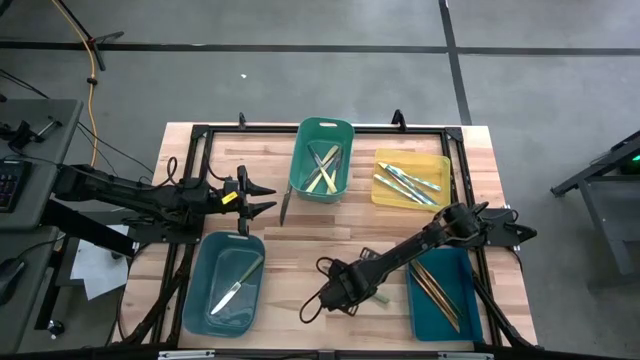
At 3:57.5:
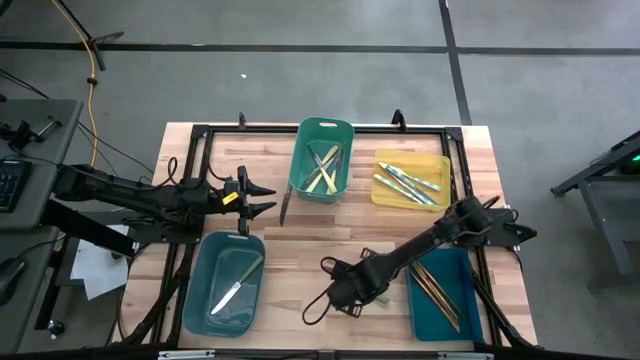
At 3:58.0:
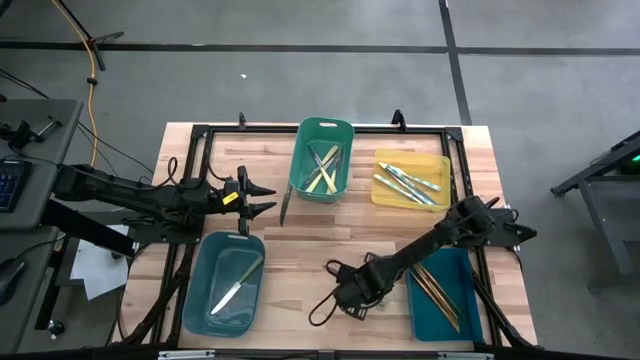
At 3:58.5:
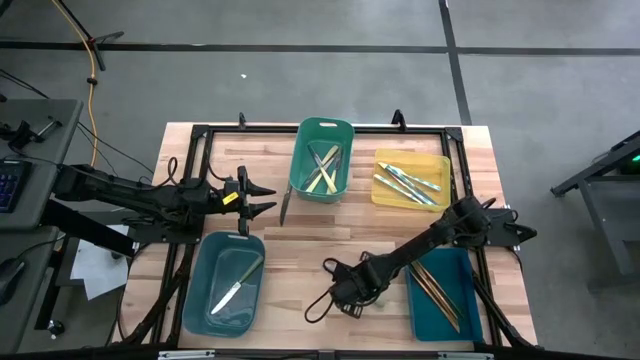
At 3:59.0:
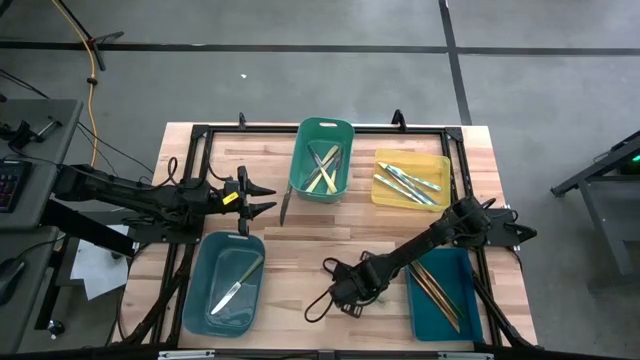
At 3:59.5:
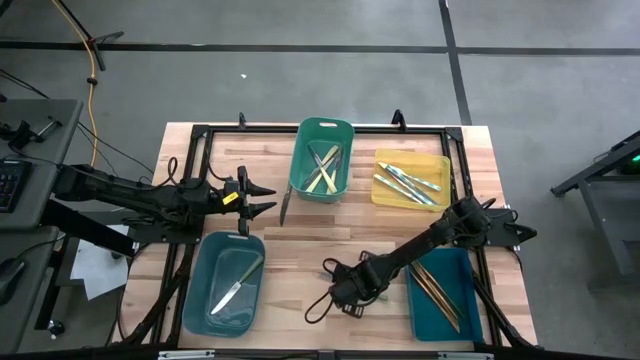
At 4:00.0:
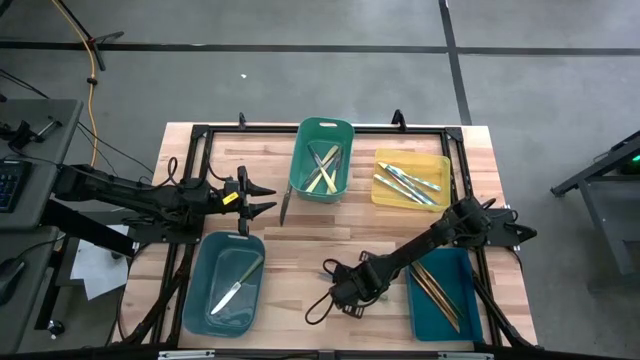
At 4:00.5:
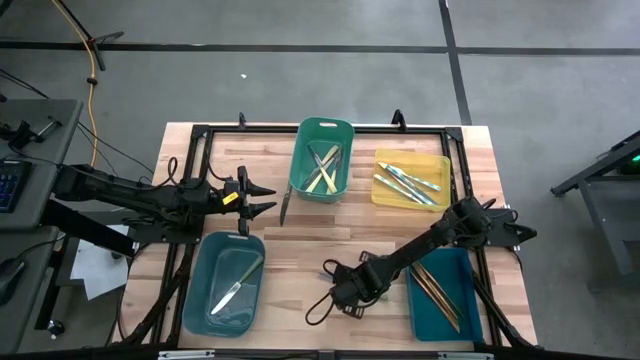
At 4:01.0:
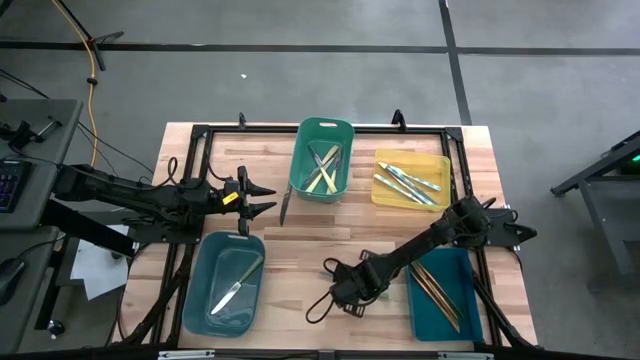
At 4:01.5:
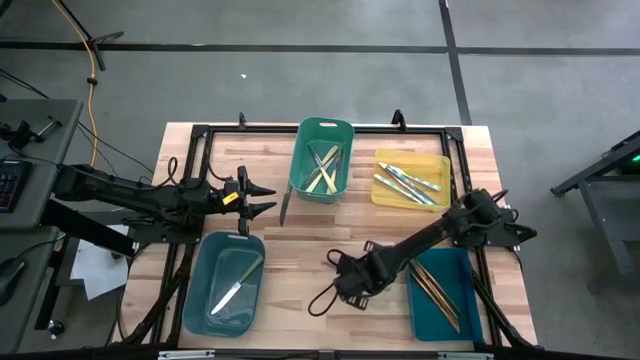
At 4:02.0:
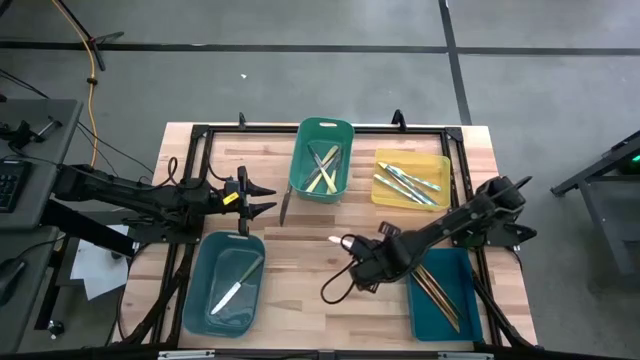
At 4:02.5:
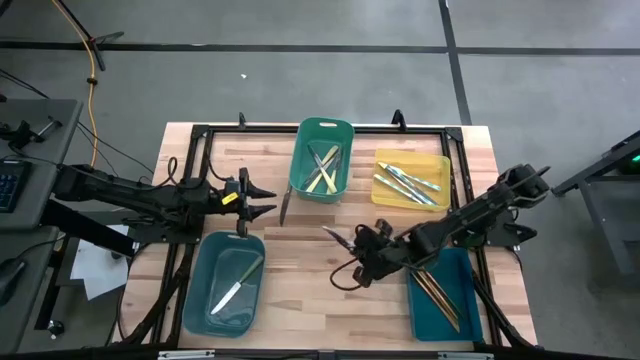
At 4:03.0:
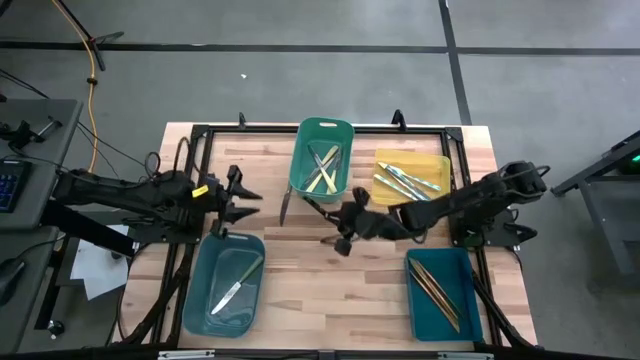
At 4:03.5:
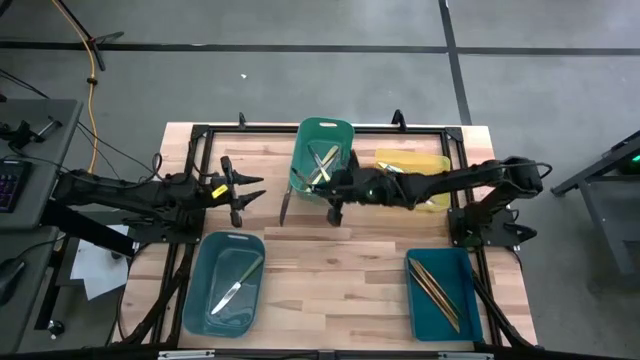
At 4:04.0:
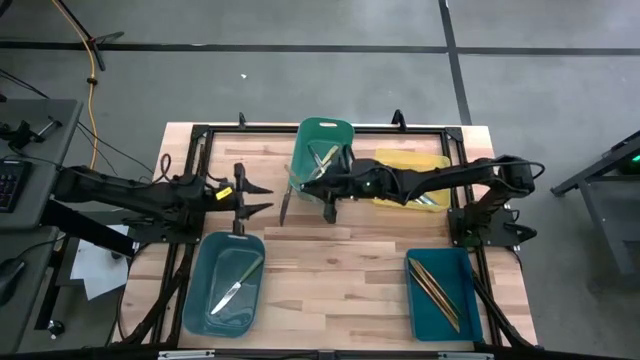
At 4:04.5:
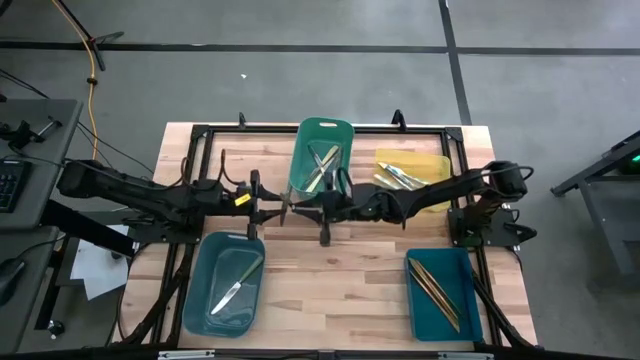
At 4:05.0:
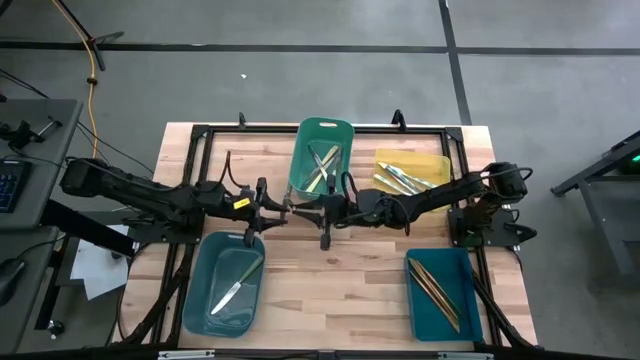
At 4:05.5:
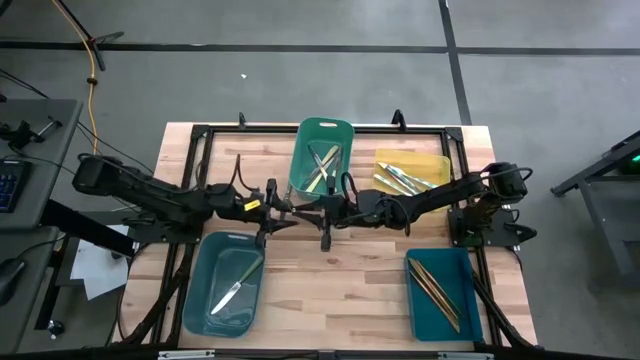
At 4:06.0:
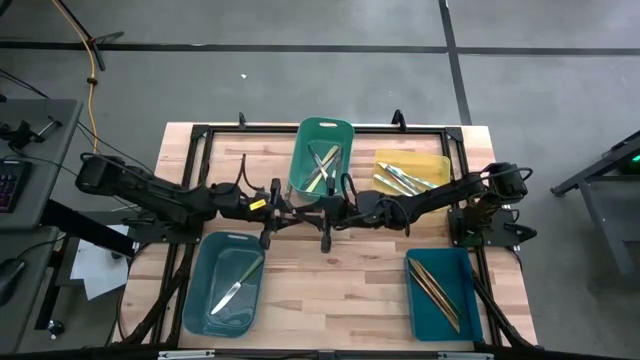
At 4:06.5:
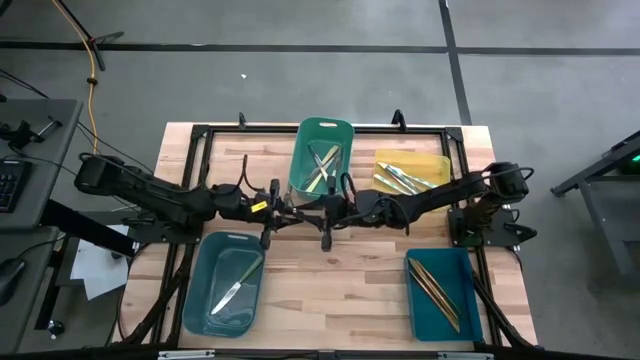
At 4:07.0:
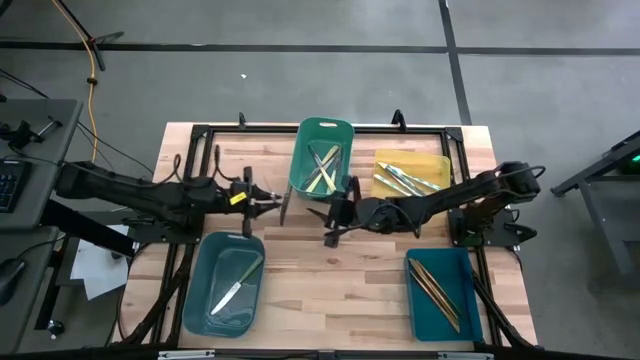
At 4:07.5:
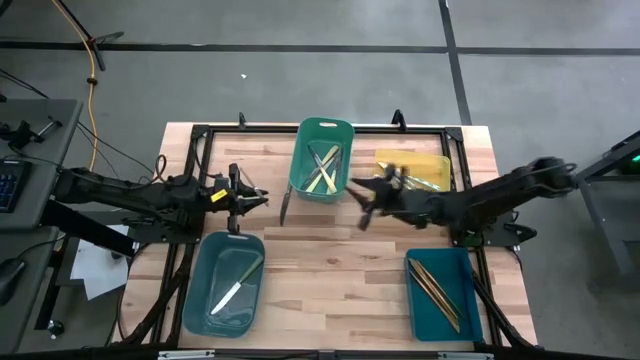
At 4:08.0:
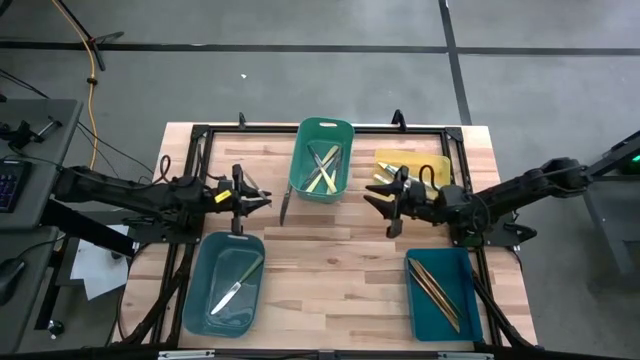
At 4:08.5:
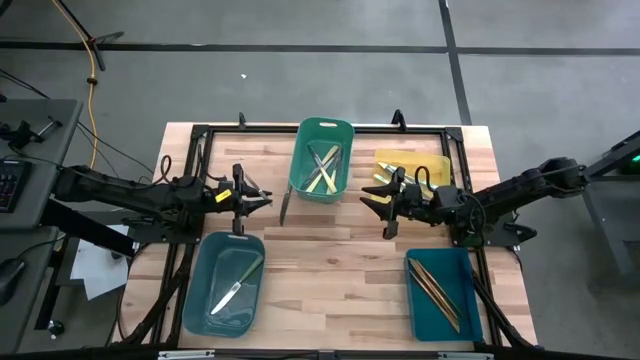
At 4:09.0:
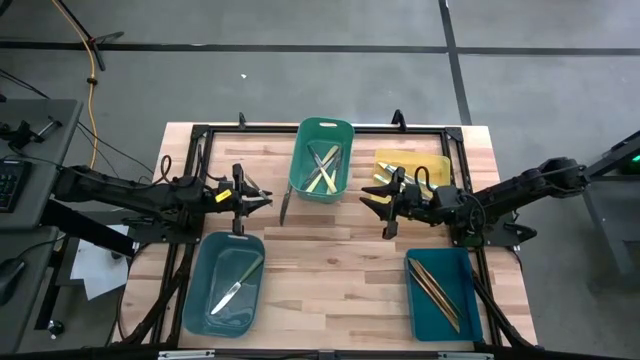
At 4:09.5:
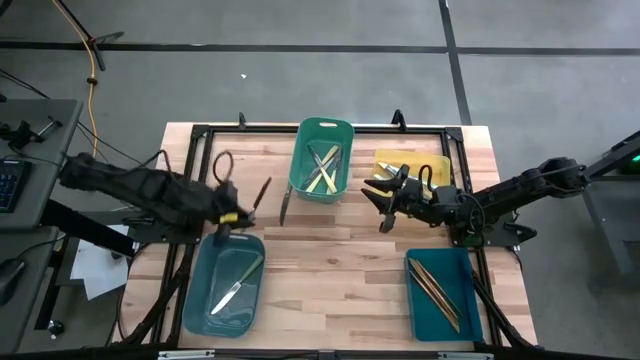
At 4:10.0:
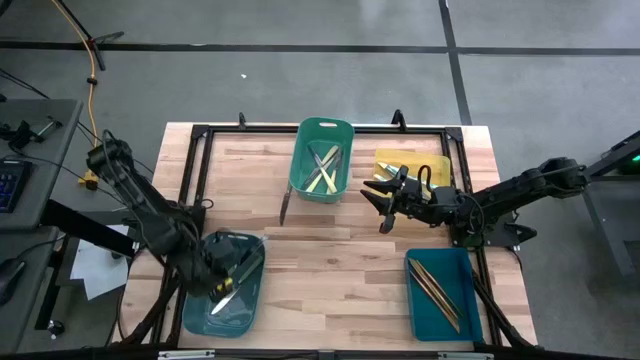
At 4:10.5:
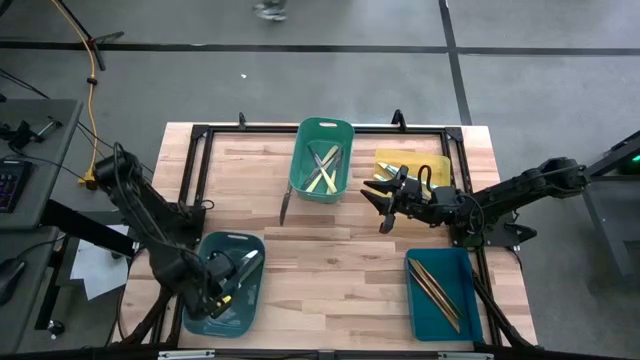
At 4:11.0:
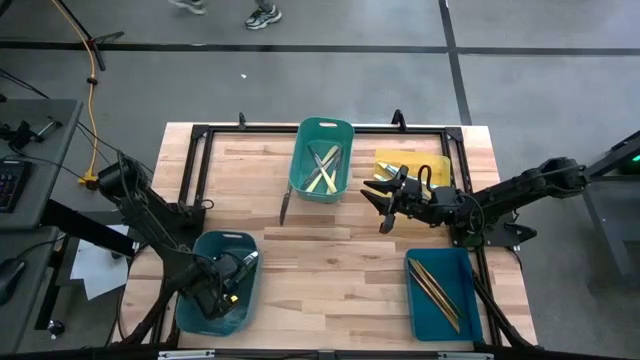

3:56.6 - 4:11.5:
Task: Sort silverware by color (type)
Put the green knife into the left blue bin

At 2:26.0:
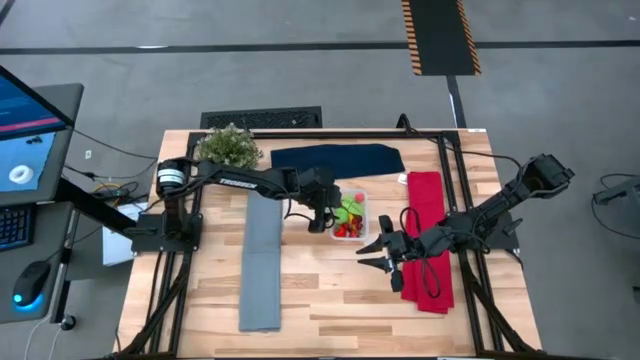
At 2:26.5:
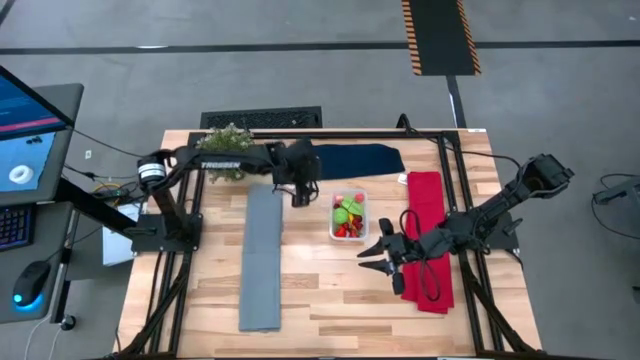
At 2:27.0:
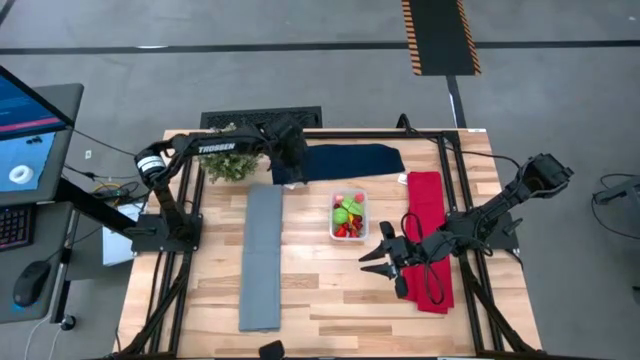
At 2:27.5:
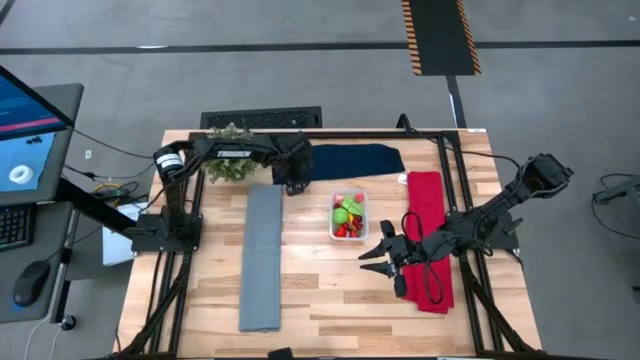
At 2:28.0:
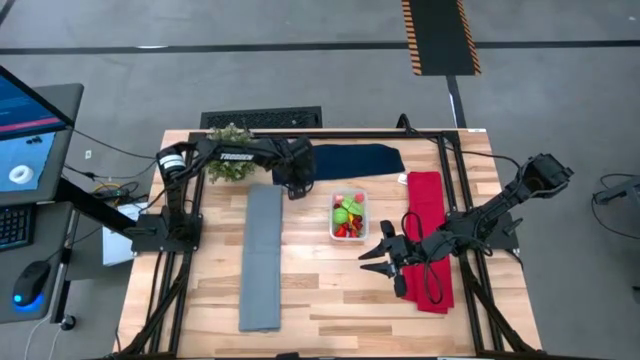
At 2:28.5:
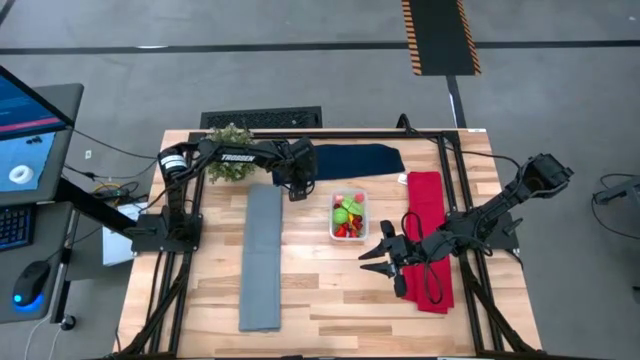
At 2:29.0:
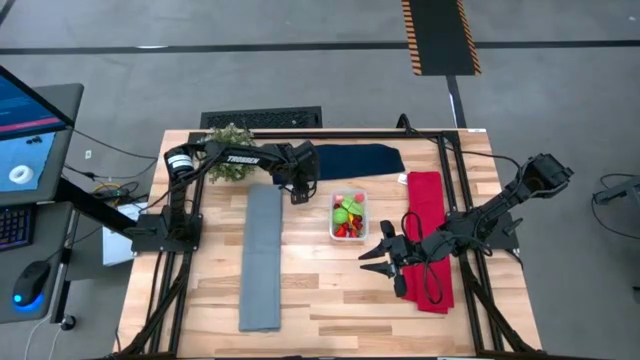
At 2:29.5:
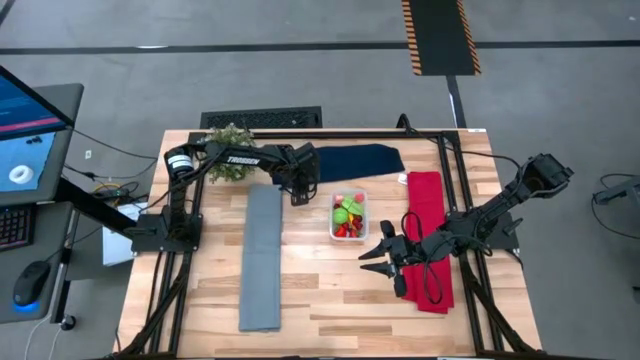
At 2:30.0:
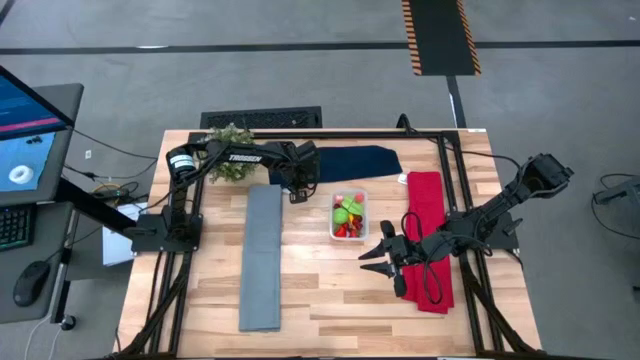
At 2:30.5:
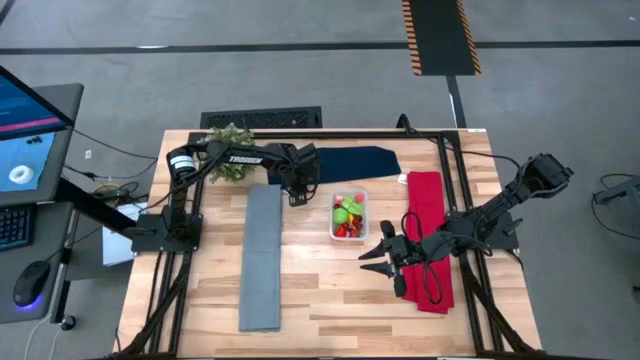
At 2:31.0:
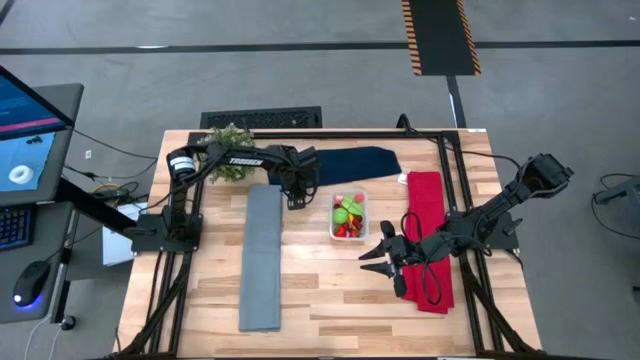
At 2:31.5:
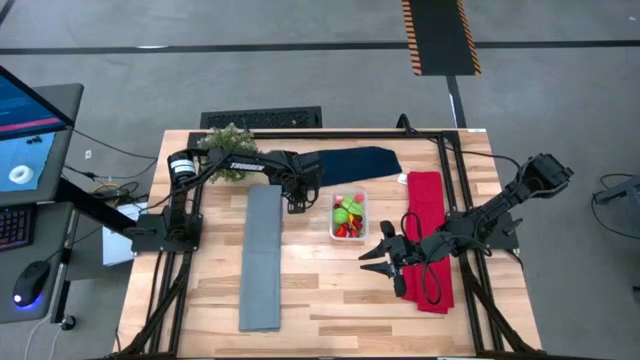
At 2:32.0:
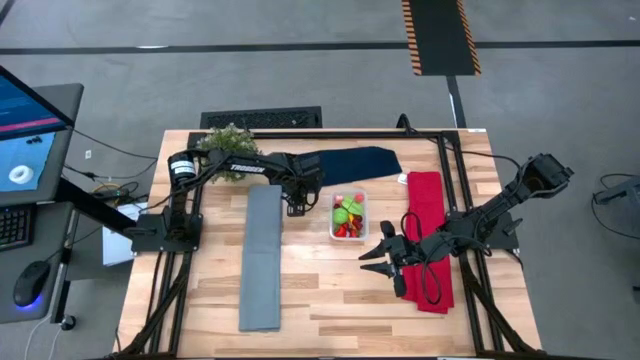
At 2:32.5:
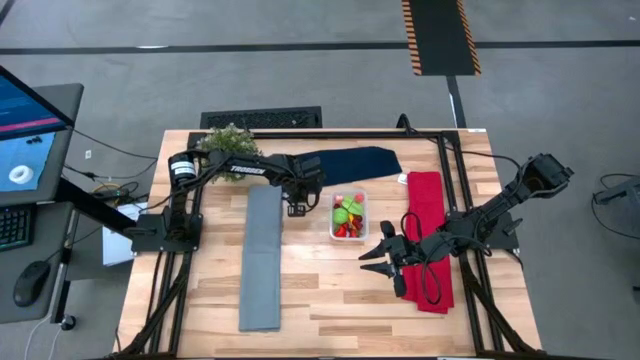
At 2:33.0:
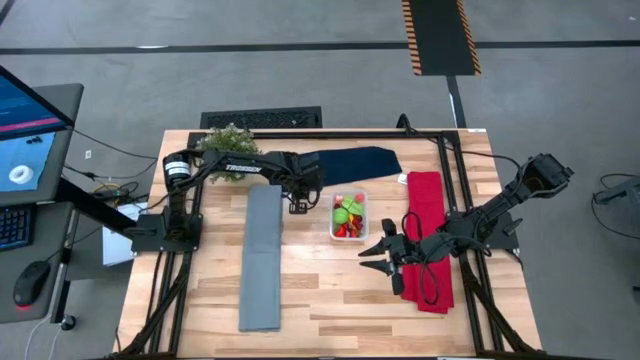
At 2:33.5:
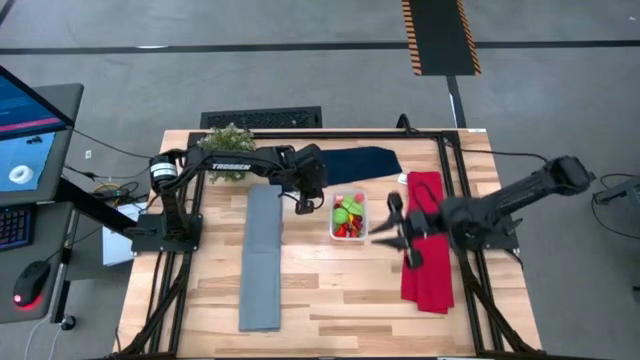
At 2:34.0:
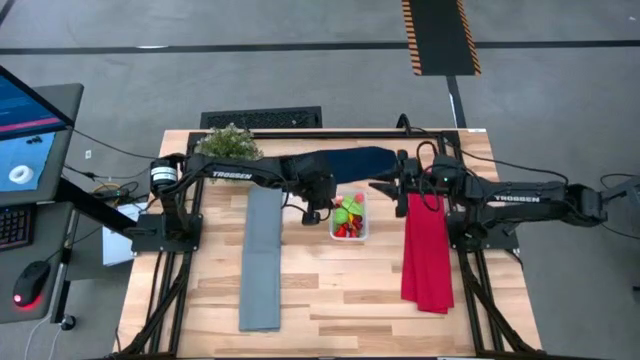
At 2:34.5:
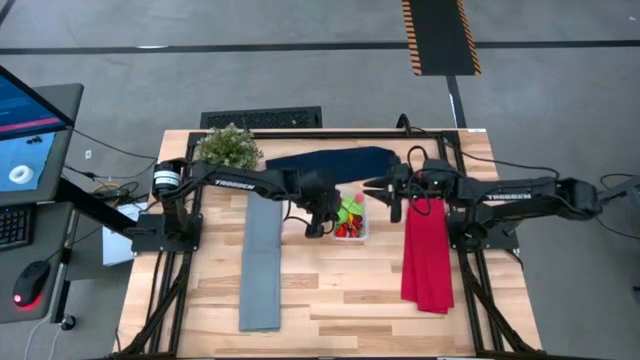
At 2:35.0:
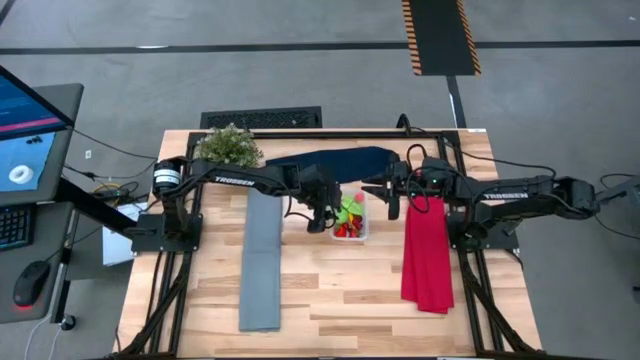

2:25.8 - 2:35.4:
Task: Pick and placing Produce into tupperware
Put the blueberry into the transparent bin
